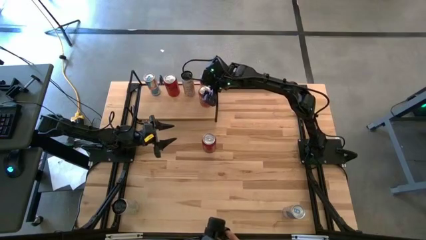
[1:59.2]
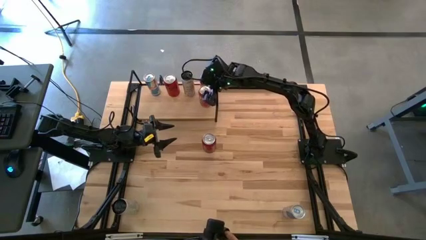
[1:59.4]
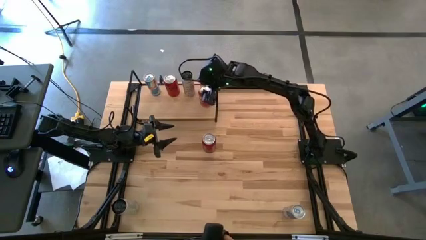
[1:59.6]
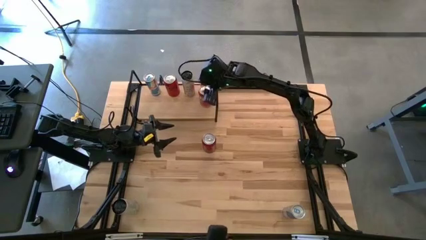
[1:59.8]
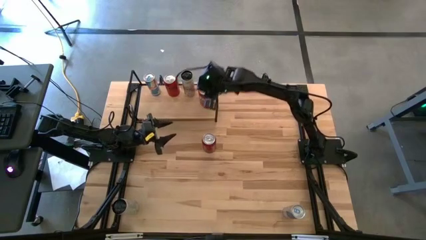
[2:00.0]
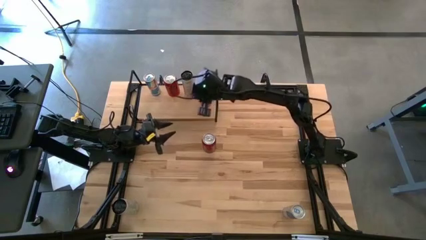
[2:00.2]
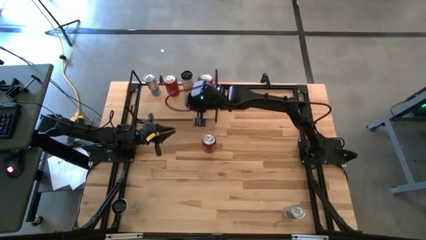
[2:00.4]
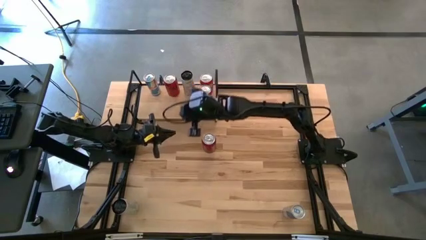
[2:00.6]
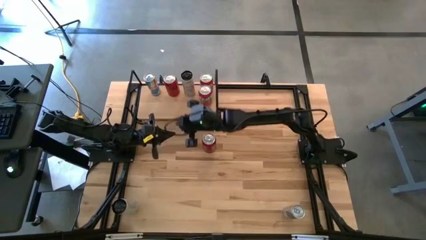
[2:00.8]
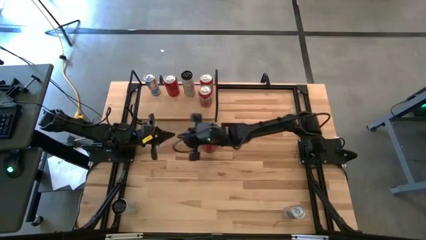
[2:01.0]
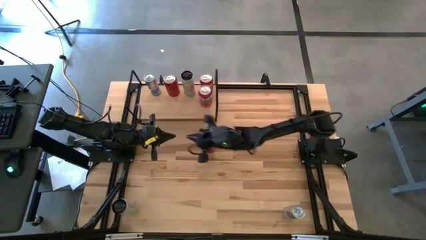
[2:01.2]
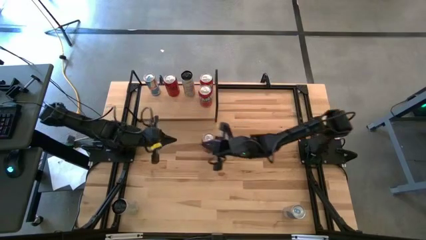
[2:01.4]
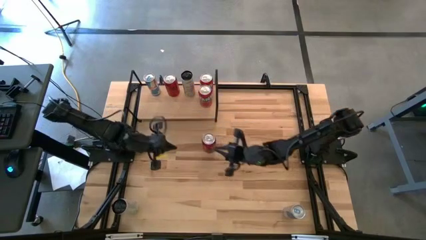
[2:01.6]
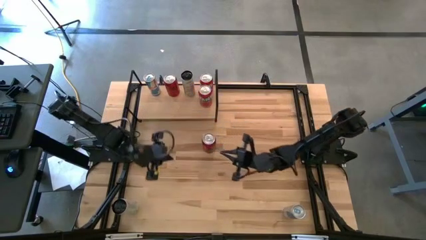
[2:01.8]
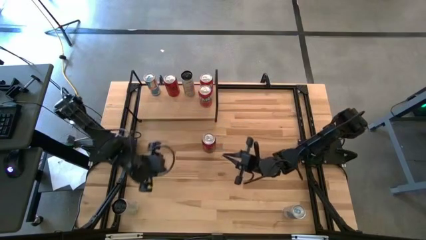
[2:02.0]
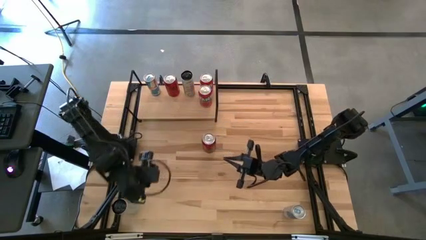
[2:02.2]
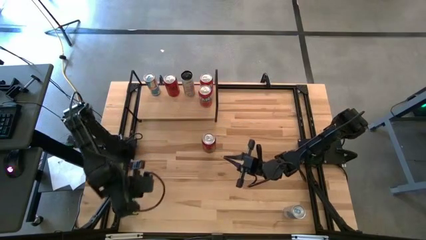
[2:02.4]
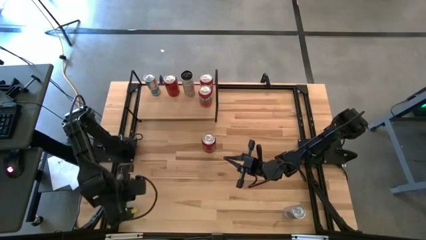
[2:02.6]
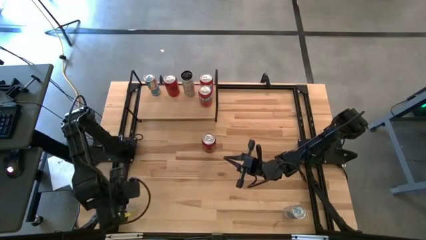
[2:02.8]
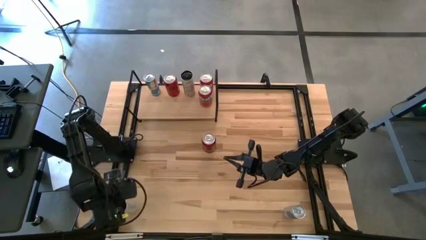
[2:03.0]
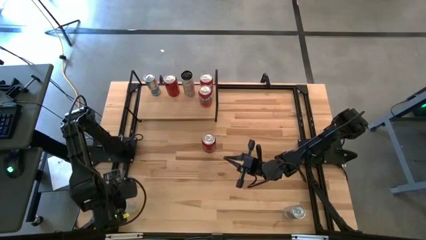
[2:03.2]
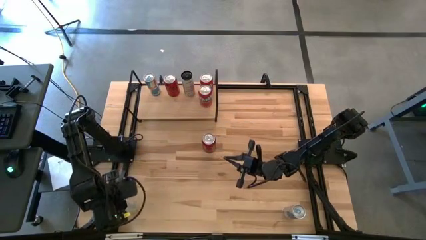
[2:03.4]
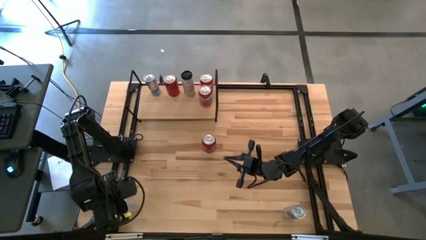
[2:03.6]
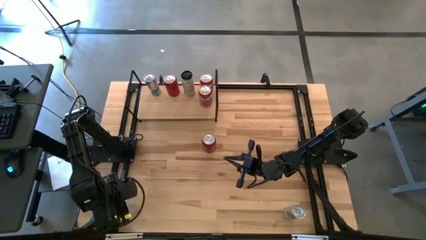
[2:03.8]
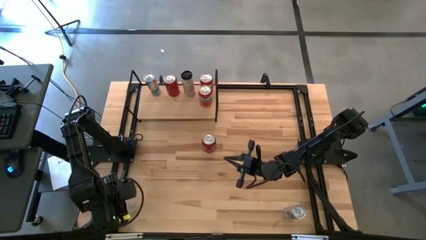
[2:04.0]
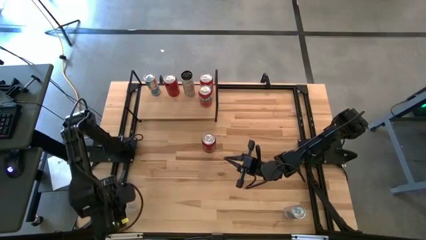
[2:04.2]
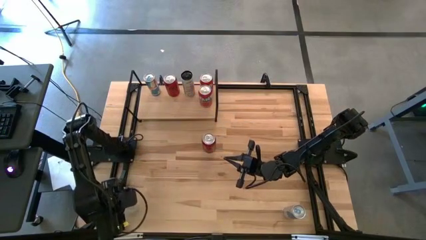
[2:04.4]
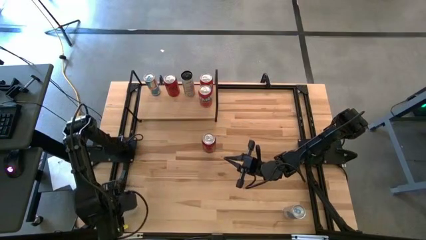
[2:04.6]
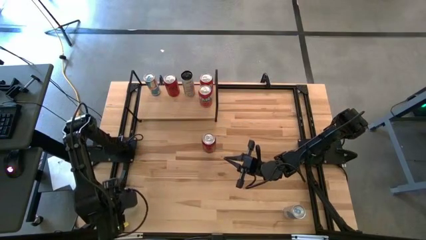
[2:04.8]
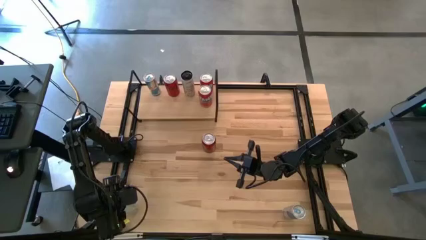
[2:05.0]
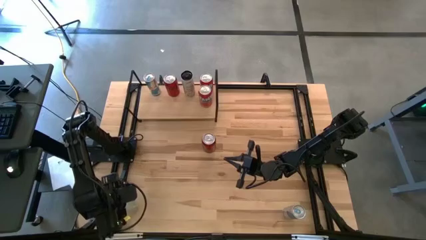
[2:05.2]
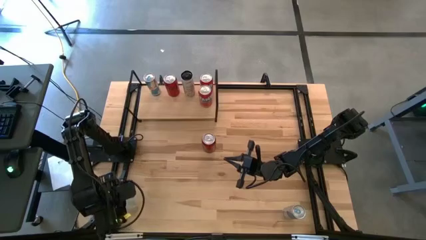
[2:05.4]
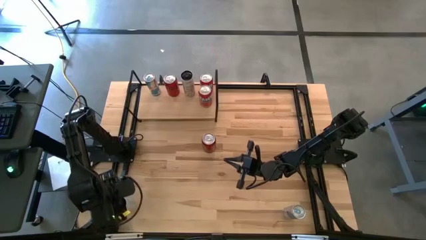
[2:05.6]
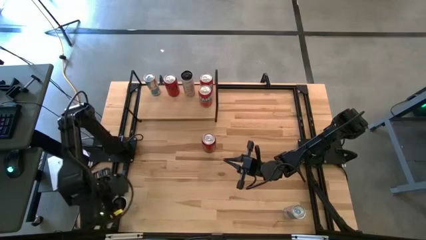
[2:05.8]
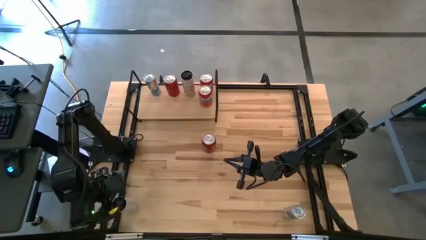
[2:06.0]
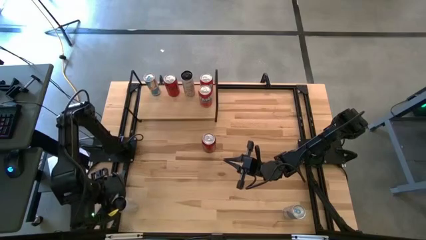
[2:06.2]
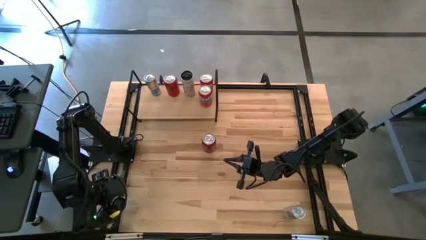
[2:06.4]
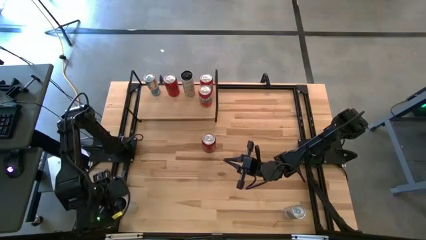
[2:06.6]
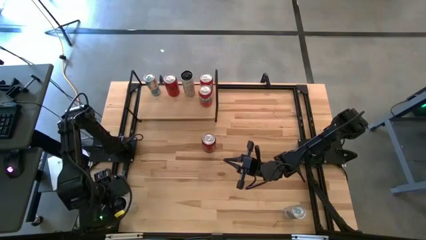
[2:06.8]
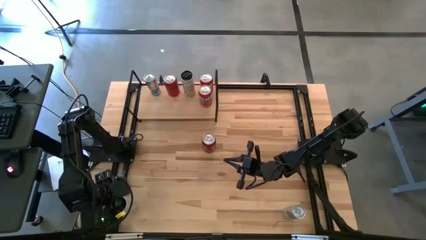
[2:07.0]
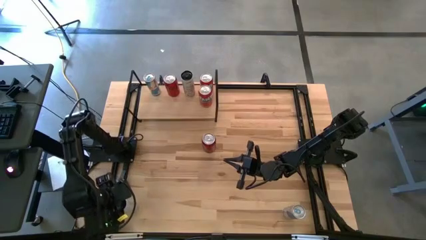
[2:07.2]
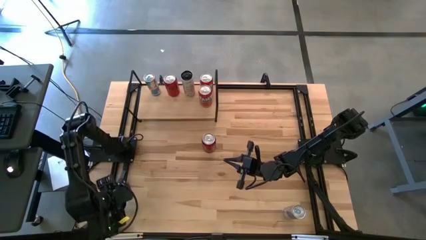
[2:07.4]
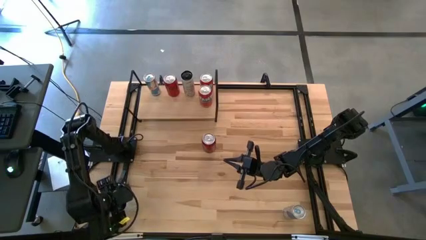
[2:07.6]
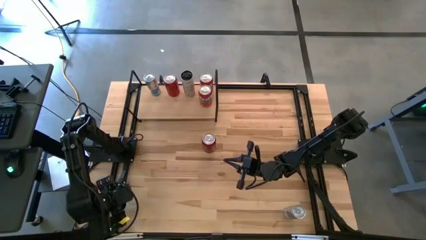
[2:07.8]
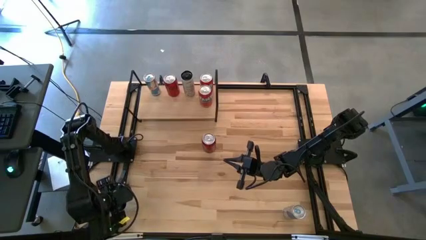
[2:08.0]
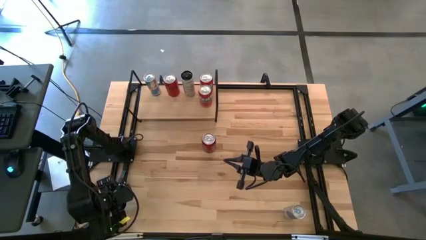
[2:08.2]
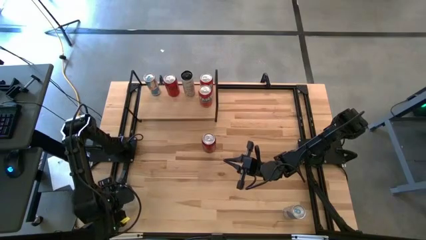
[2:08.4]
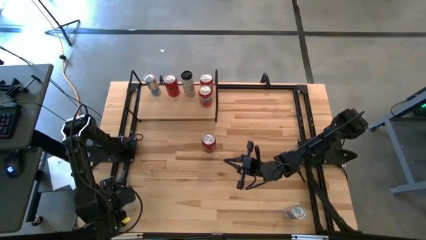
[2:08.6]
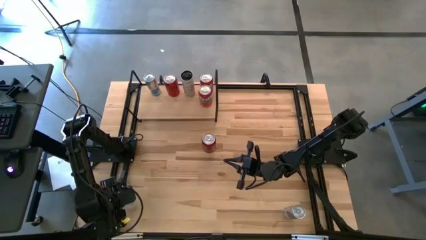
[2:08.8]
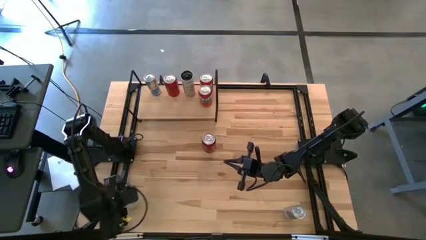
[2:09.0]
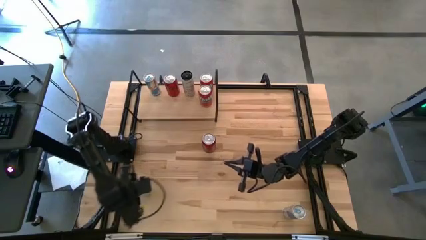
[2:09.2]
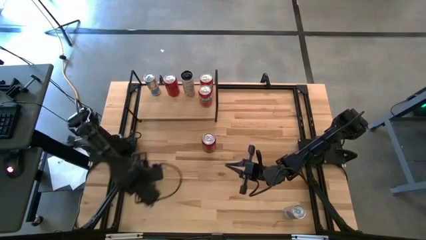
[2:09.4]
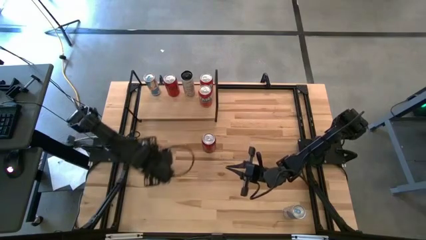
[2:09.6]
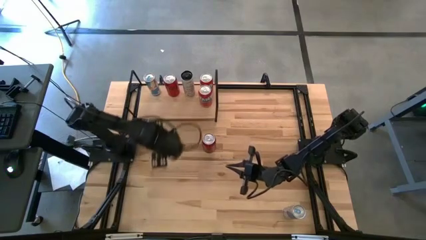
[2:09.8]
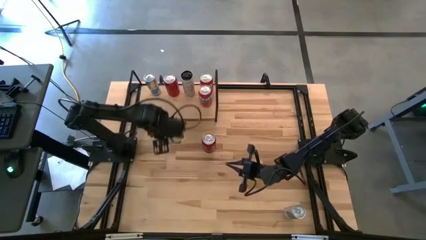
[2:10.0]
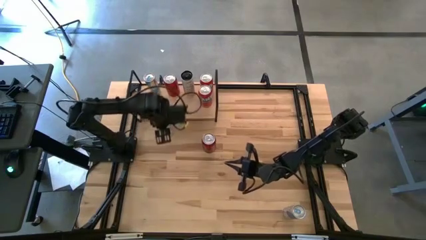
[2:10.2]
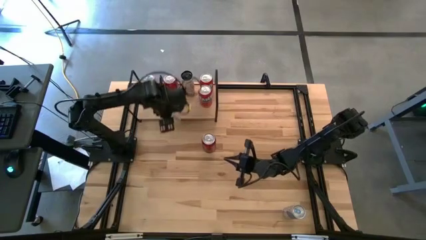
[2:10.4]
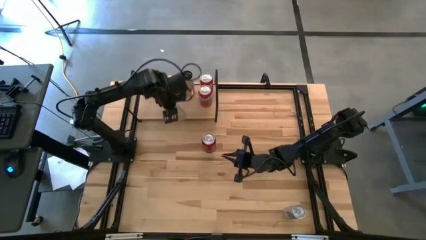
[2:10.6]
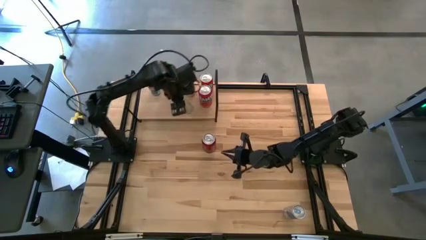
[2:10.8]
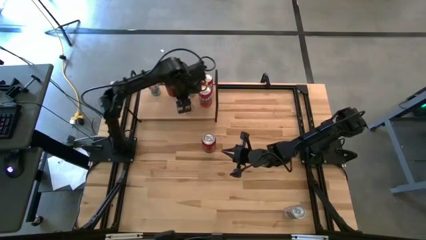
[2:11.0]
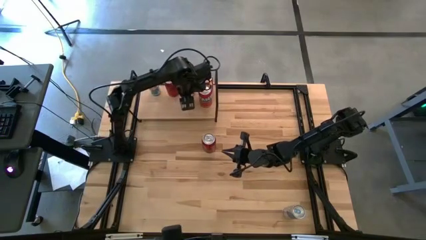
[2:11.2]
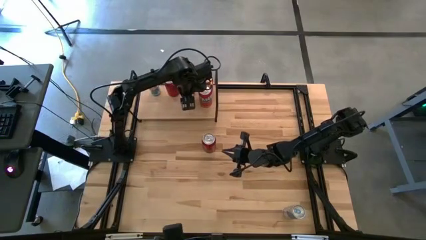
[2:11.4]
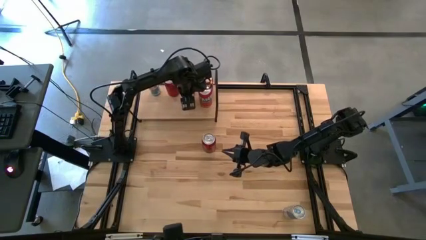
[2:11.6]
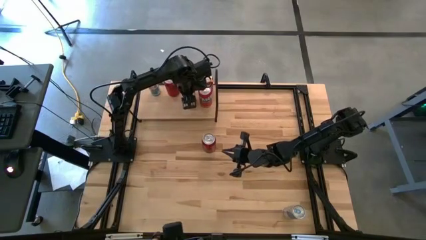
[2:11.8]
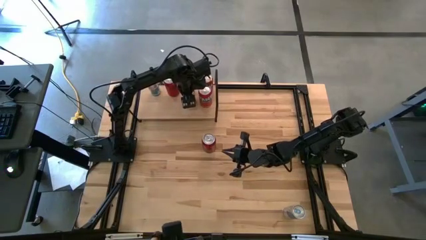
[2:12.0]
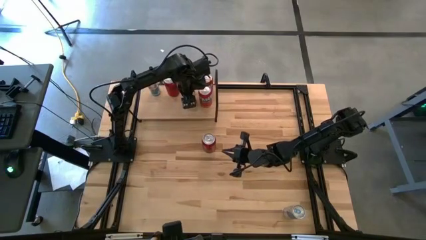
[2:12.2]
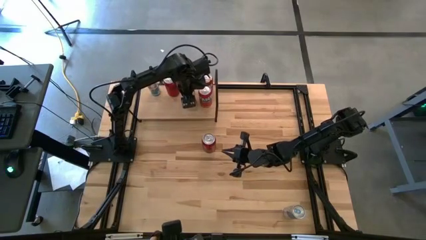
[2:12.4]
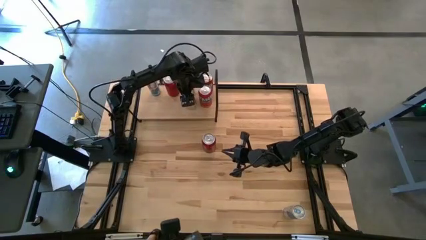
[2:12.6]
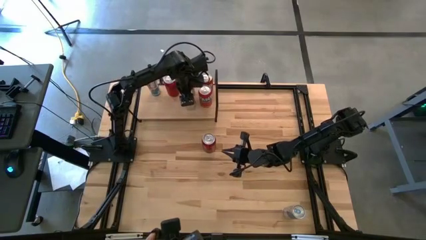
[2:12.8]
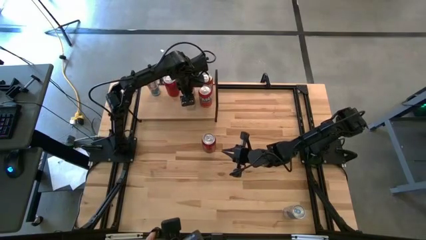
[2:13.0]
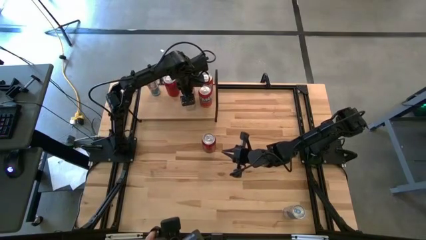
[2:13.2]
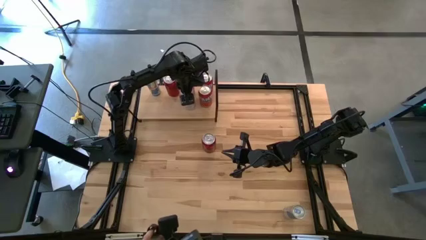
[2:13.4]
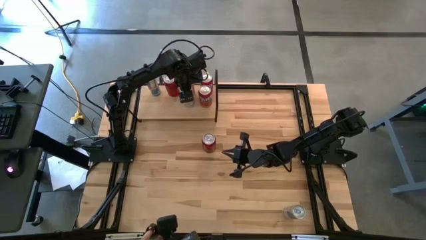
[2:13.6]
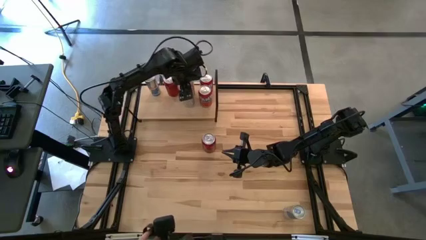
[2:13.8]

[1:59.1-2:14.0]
Task: Place canned beverage on shelf
Put the white yellow soda can aligned with the other white soda yellow can on the shelf
